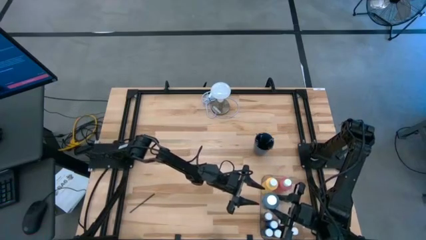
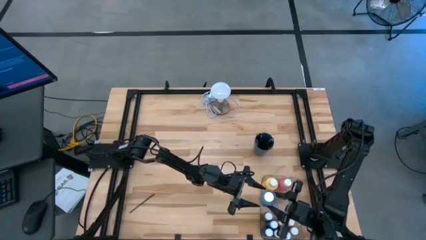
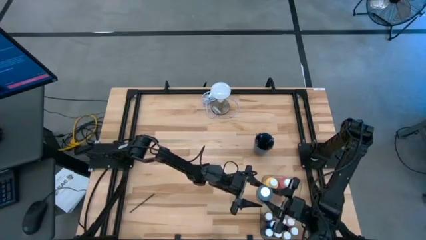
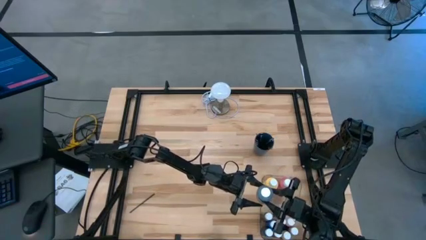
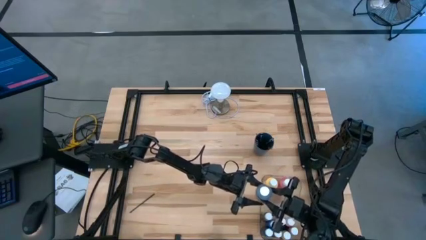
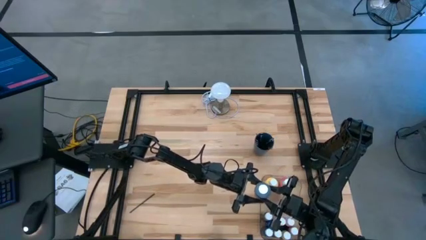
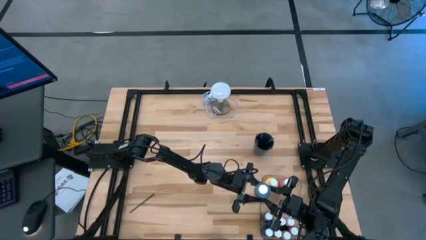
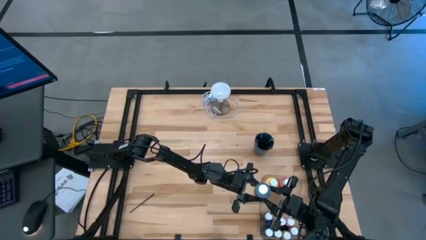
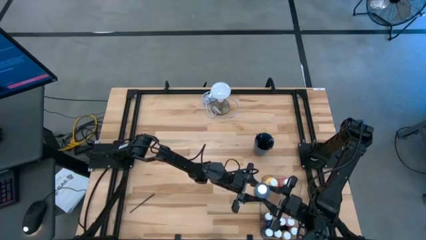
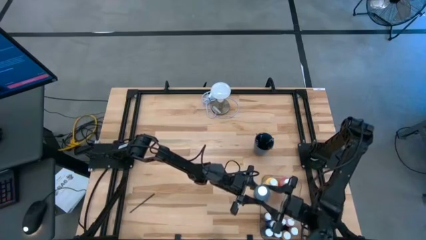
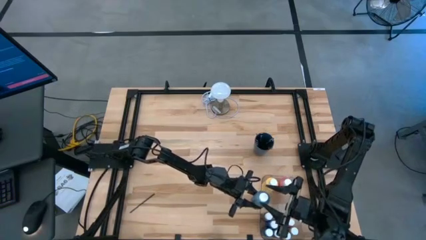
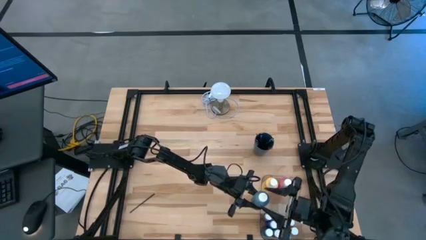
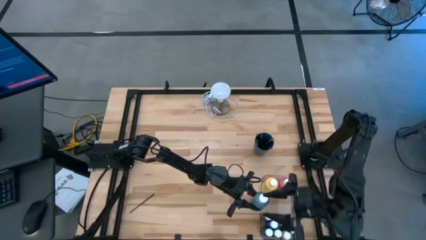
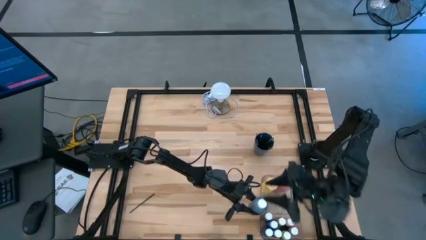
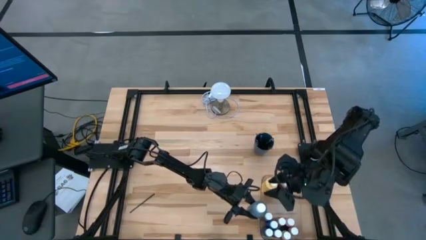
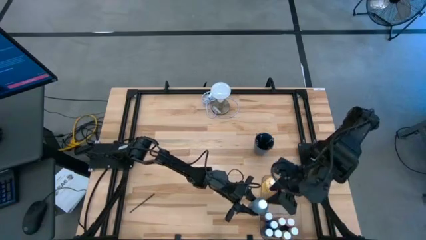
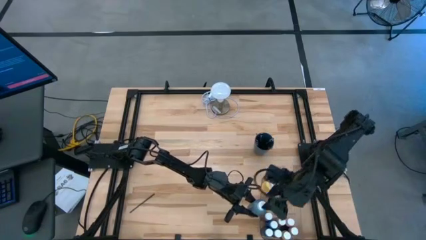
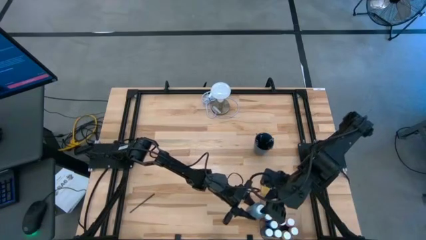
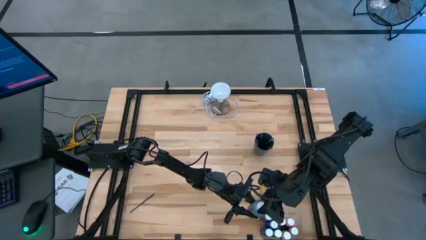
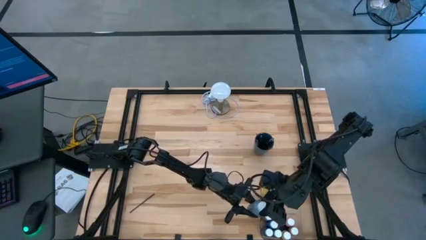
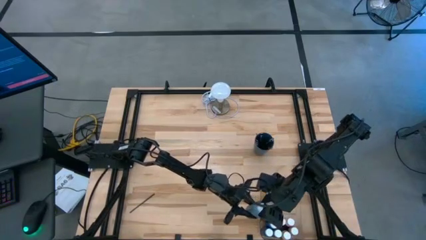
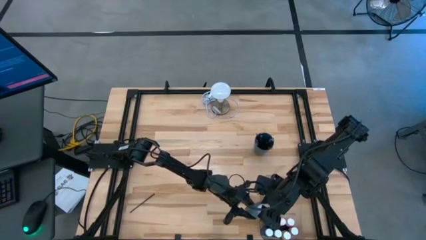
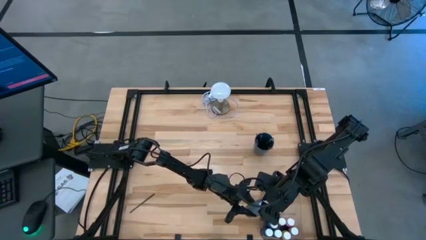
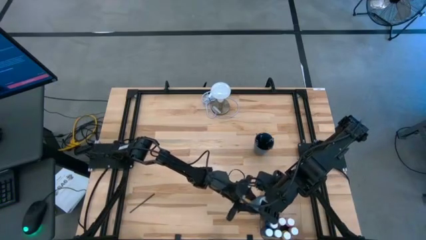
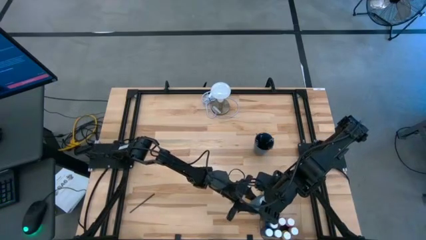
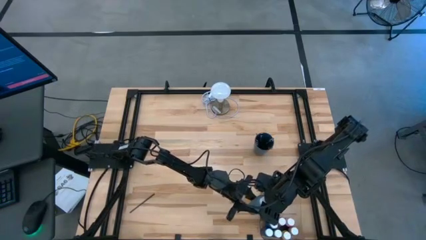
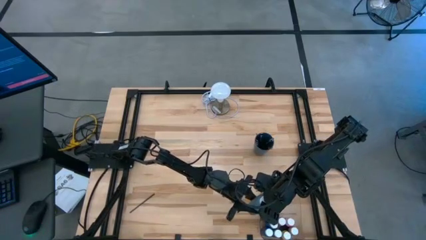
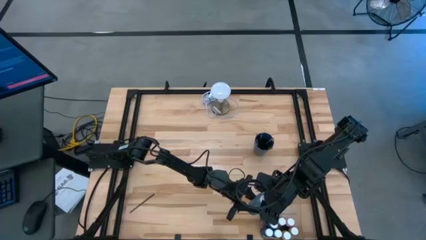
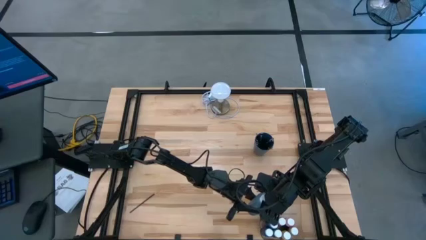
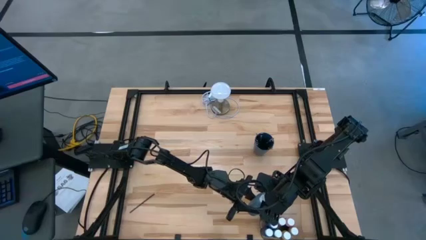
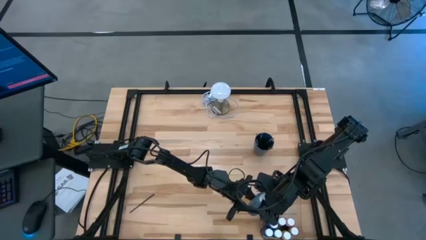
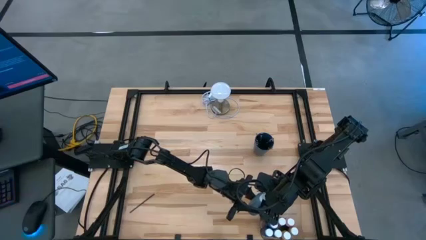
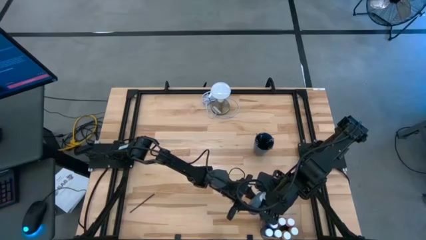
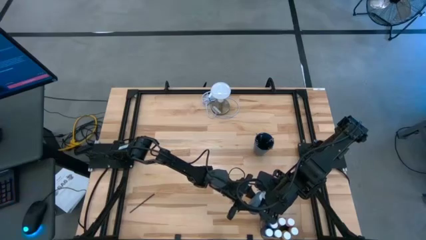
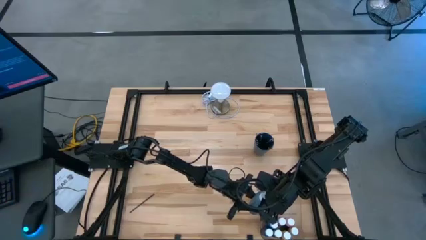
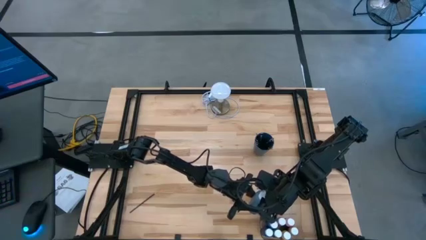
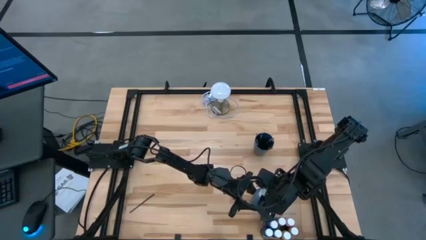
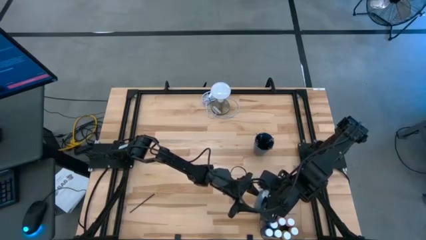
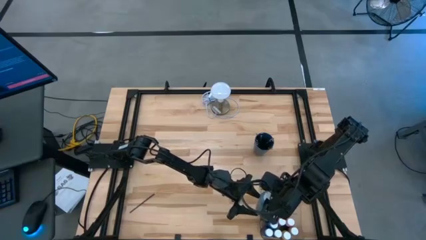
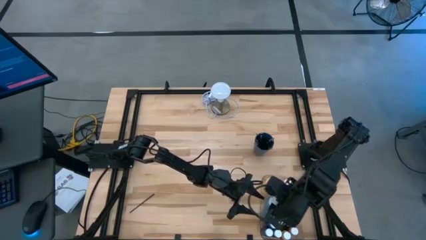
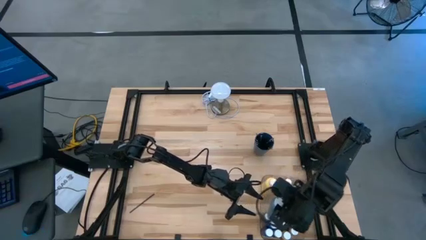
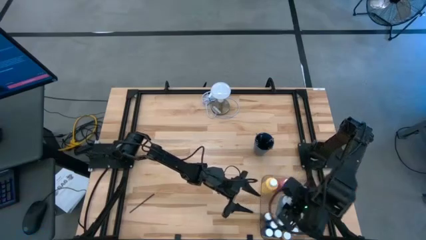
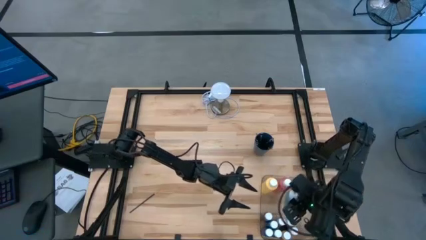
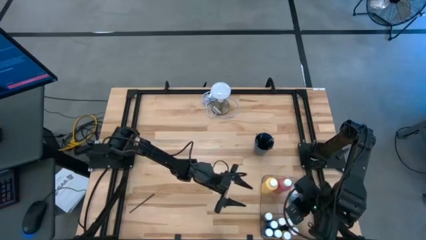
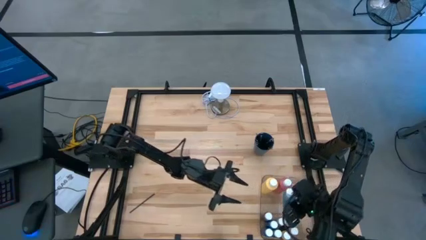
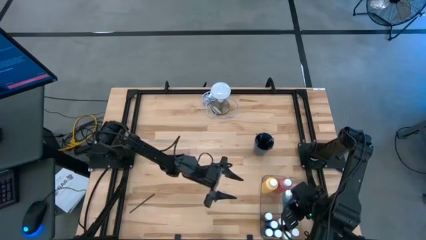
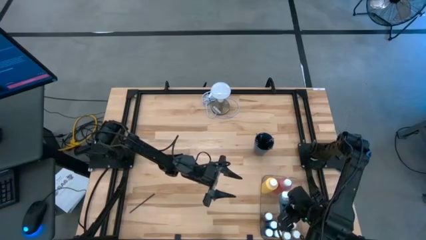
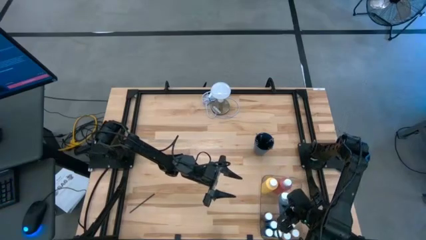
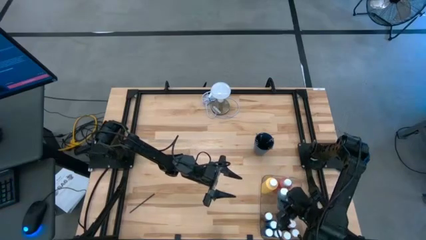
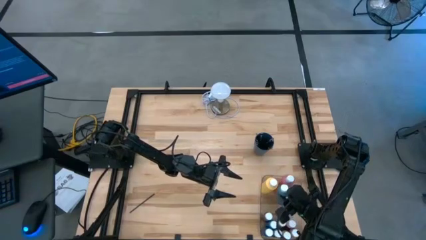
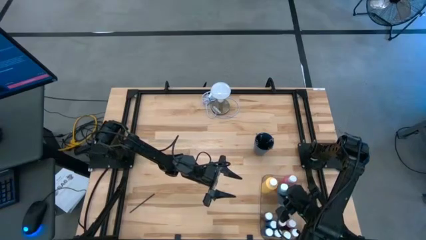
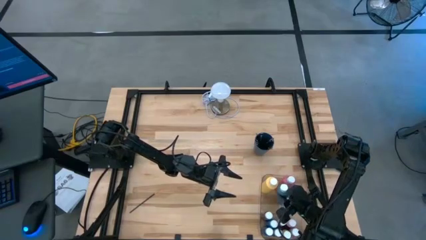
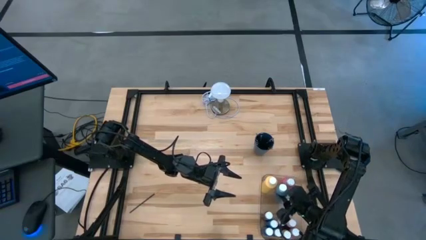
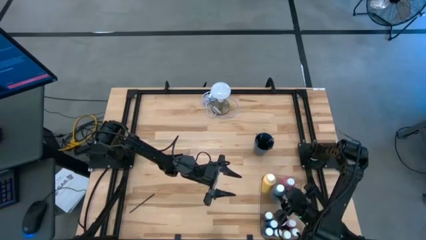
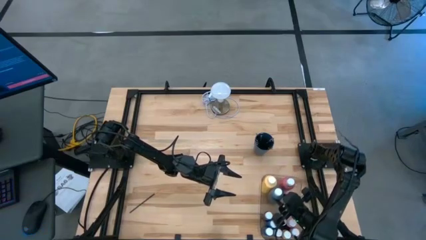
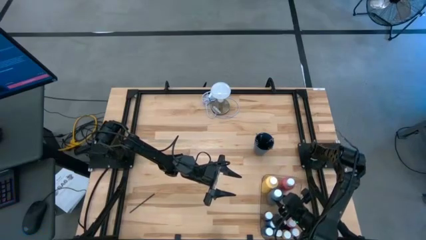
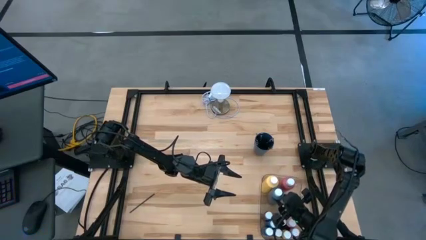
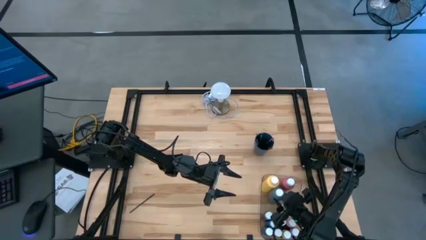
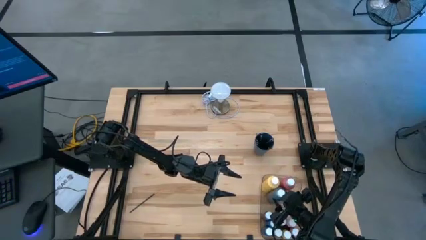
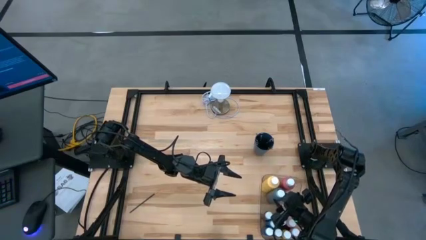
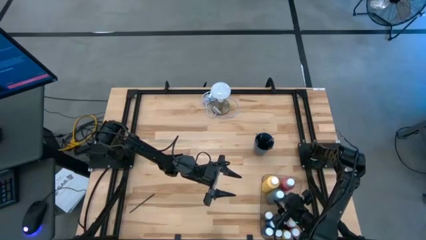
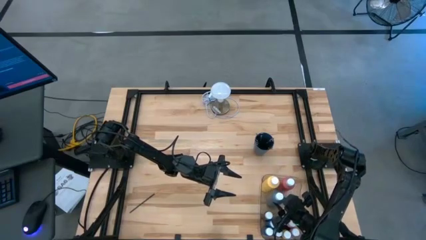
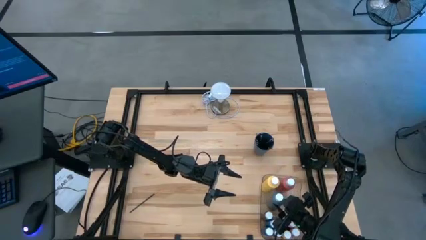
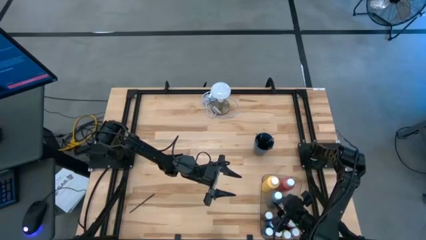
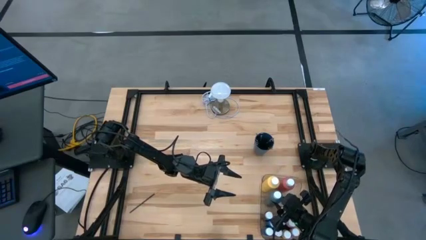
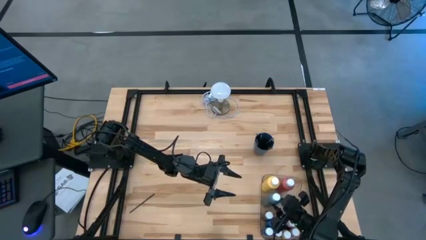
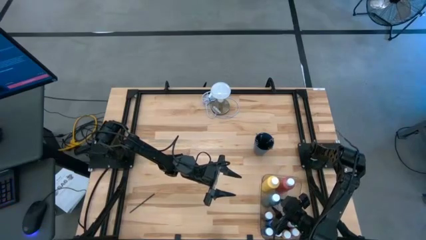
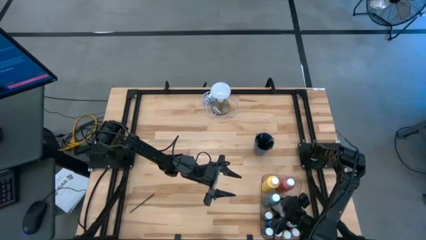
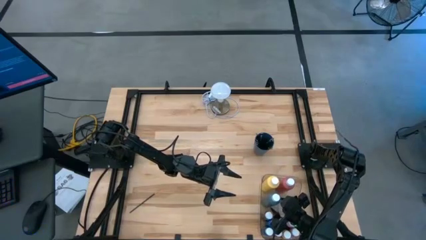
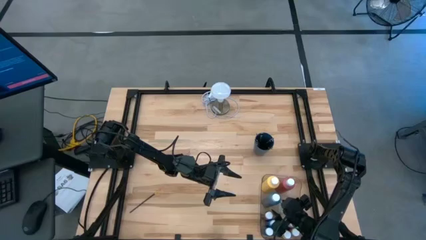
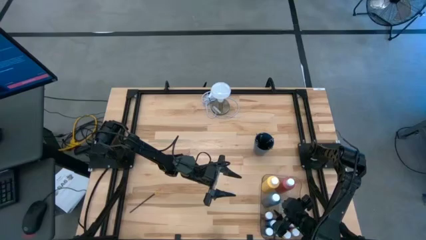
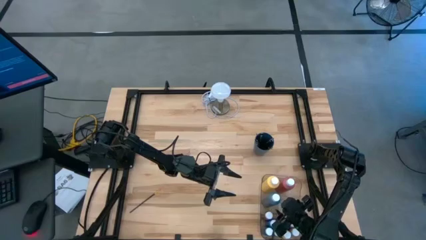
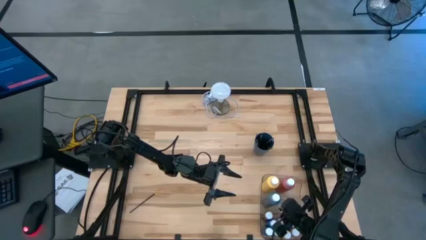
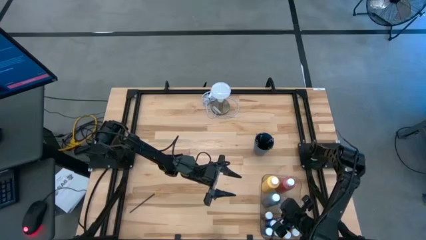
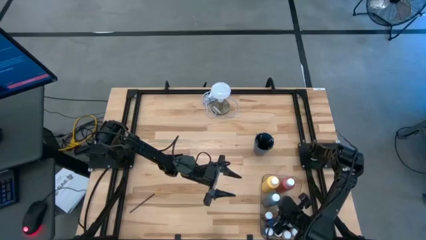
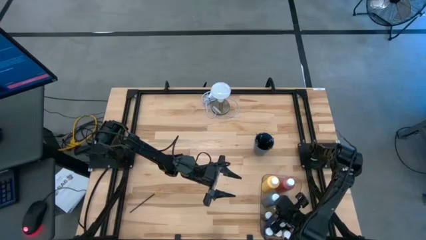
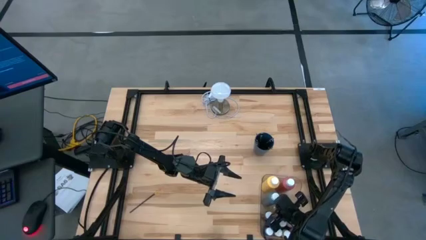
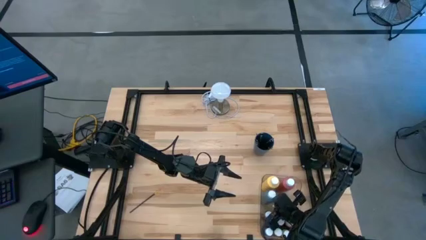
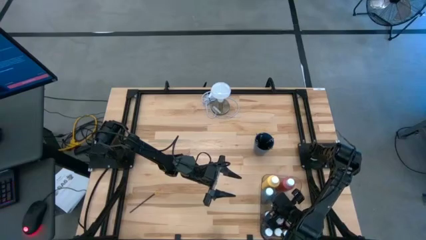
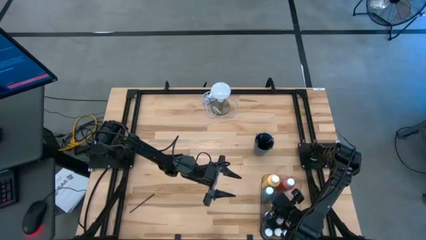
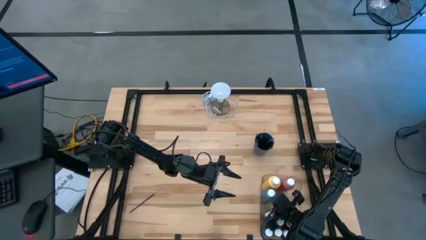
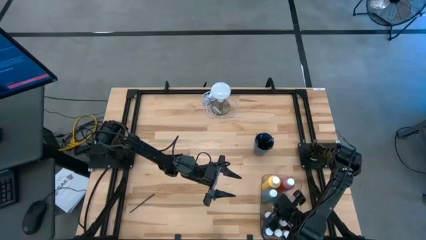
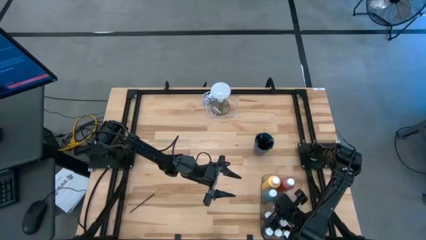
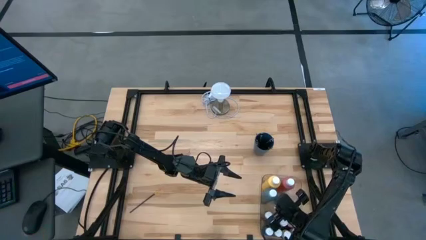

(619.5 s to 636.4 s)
Task: Pick & Place Paint Supplies
Put the large dark blue paint bottle into the transparent bin
